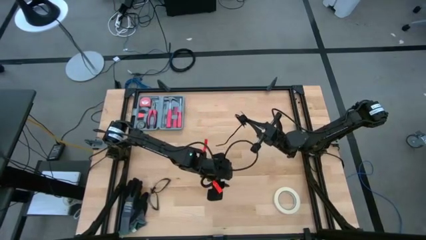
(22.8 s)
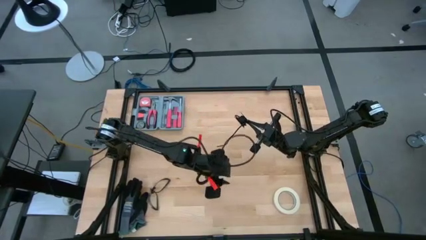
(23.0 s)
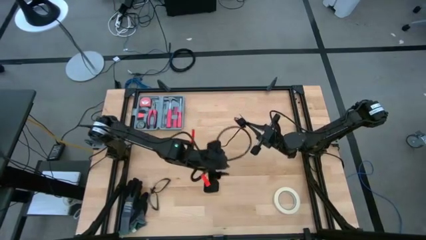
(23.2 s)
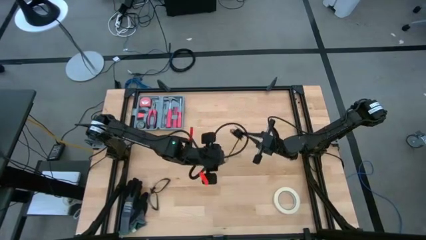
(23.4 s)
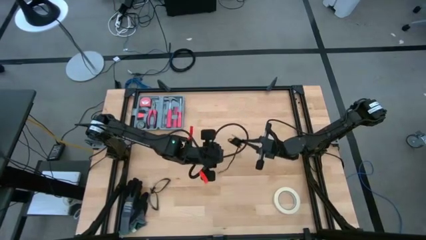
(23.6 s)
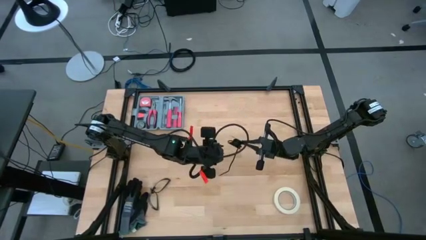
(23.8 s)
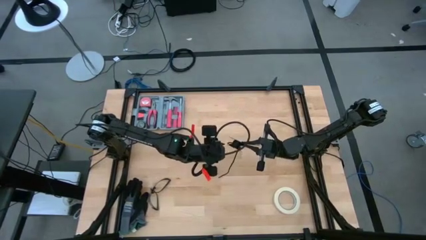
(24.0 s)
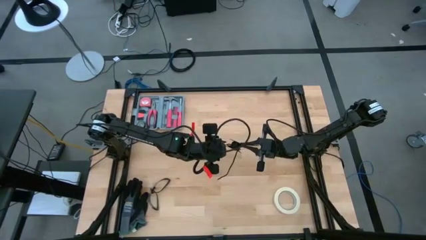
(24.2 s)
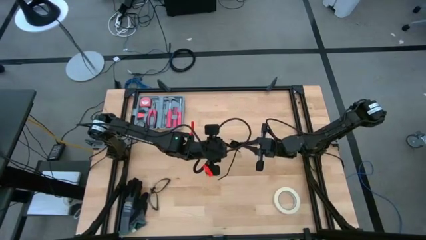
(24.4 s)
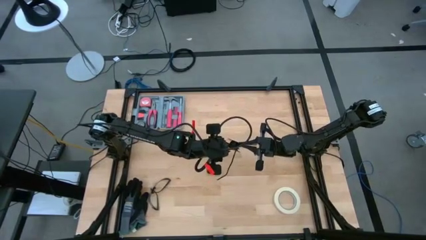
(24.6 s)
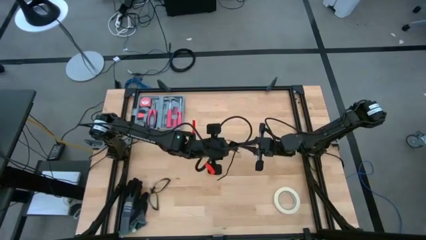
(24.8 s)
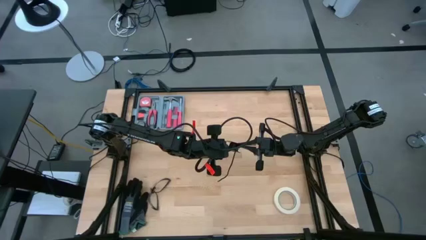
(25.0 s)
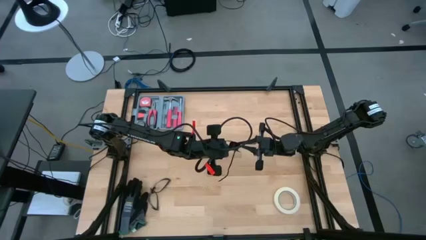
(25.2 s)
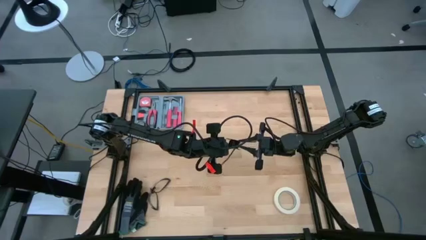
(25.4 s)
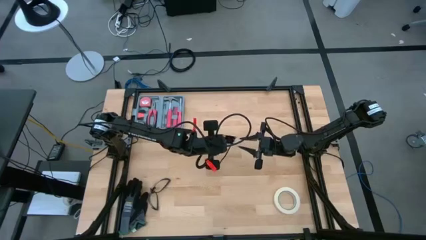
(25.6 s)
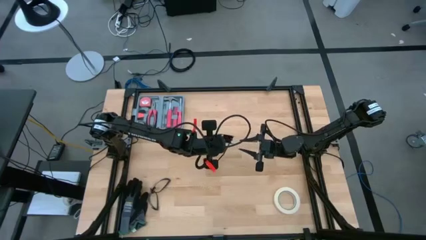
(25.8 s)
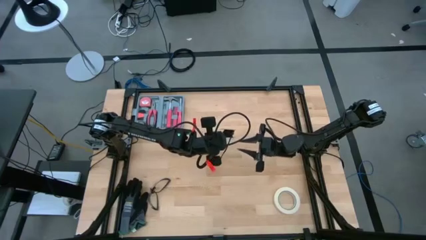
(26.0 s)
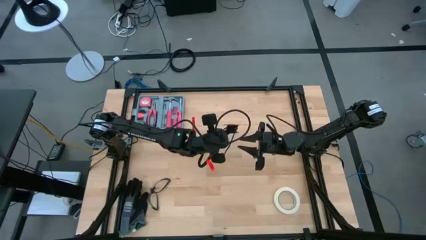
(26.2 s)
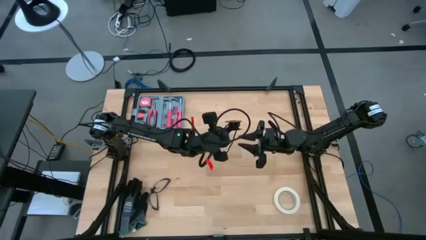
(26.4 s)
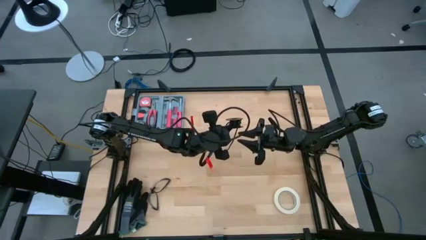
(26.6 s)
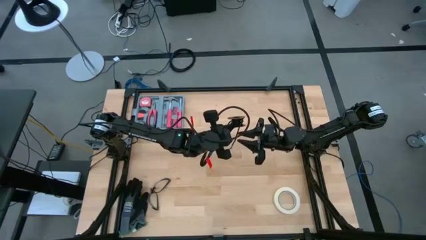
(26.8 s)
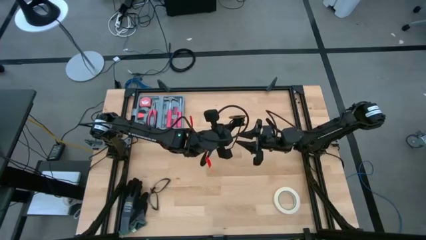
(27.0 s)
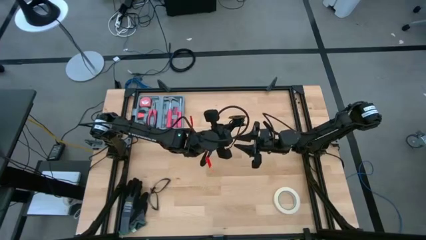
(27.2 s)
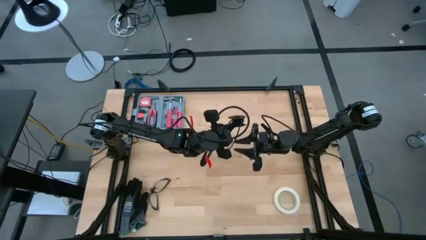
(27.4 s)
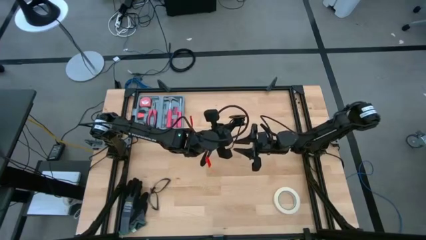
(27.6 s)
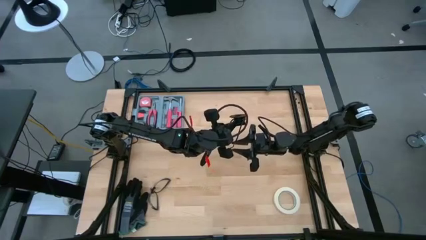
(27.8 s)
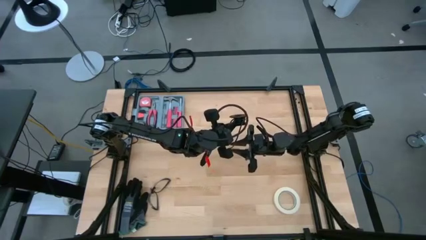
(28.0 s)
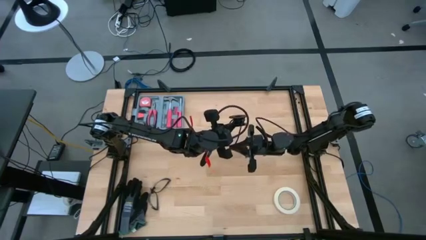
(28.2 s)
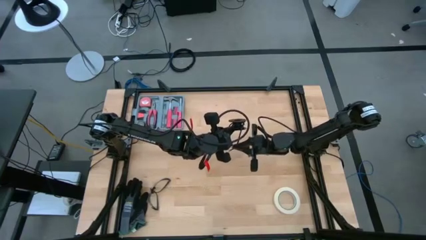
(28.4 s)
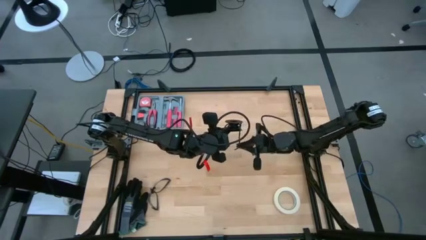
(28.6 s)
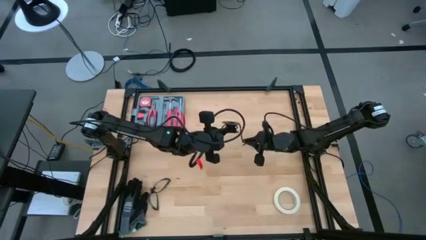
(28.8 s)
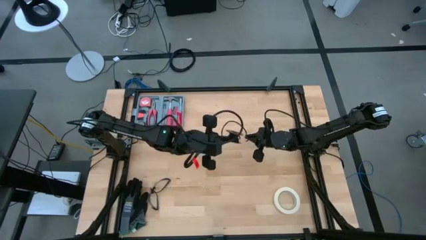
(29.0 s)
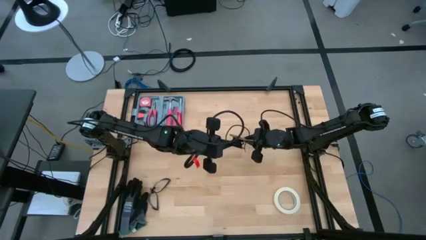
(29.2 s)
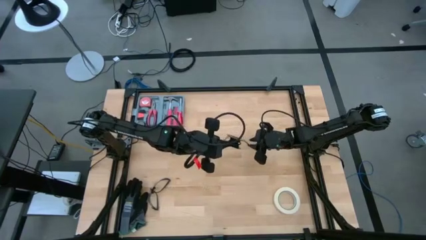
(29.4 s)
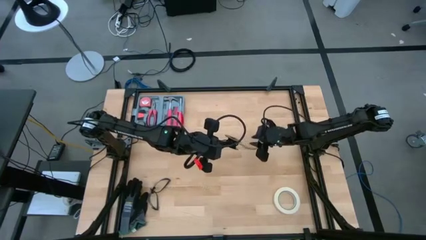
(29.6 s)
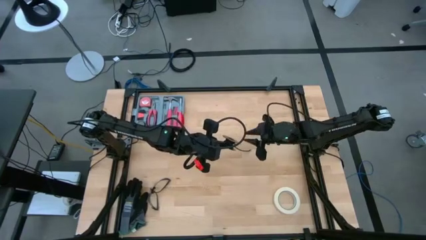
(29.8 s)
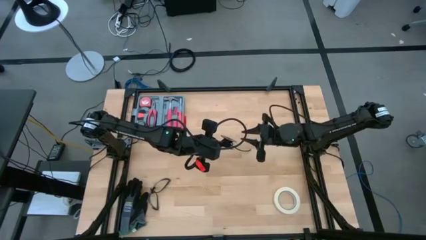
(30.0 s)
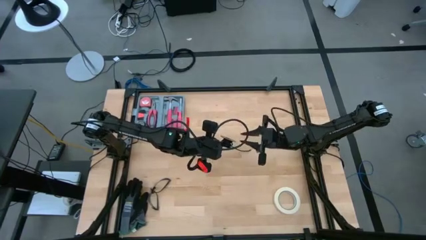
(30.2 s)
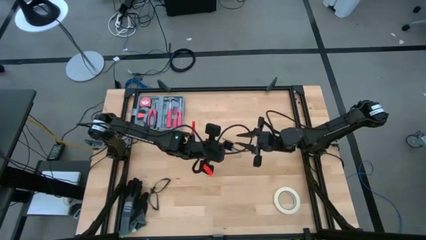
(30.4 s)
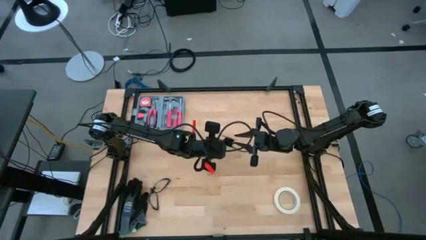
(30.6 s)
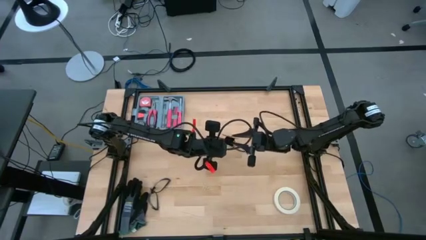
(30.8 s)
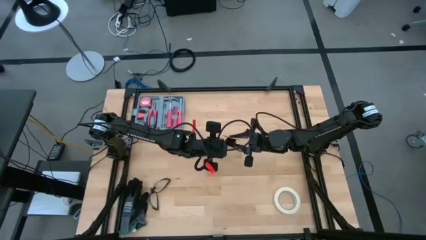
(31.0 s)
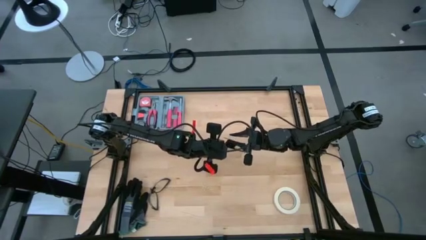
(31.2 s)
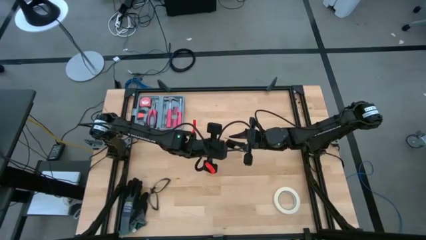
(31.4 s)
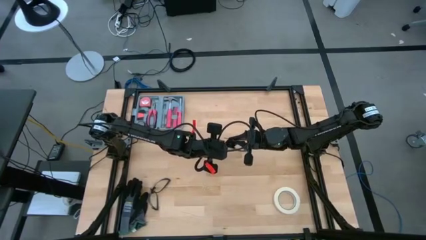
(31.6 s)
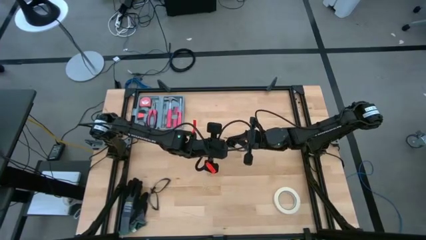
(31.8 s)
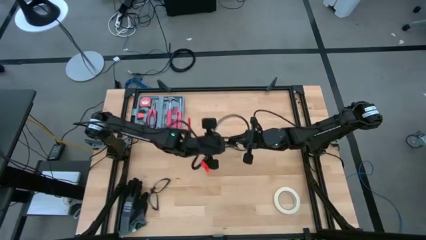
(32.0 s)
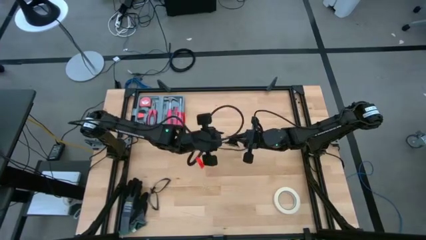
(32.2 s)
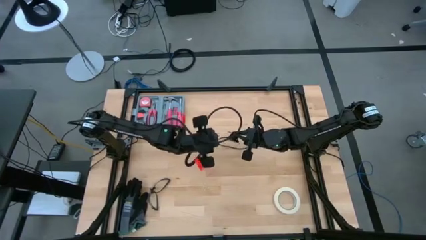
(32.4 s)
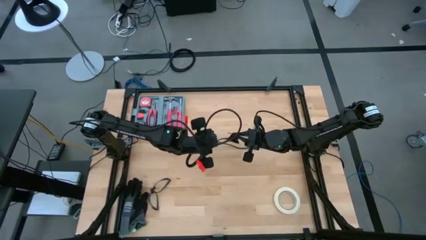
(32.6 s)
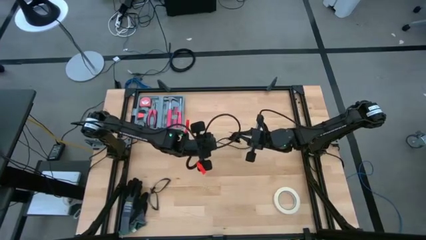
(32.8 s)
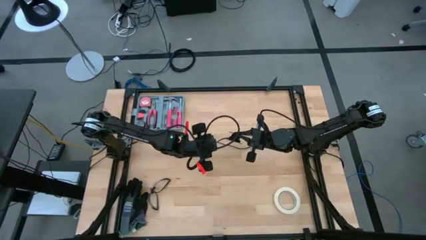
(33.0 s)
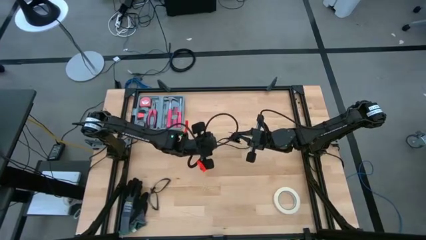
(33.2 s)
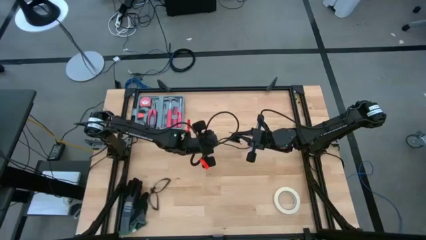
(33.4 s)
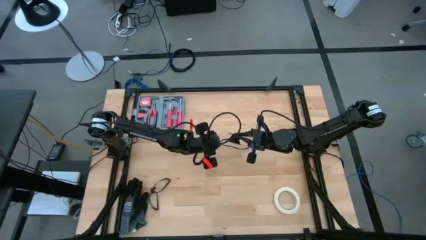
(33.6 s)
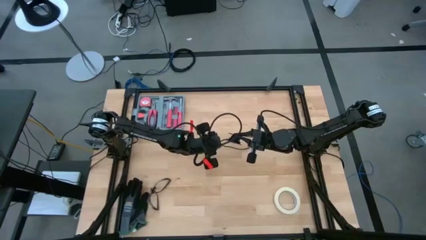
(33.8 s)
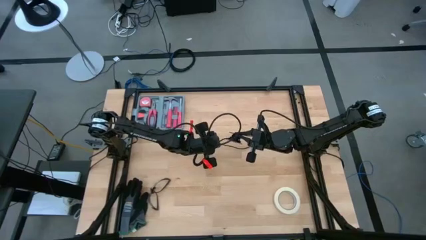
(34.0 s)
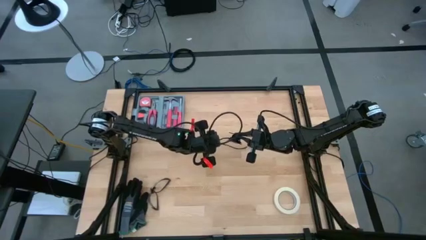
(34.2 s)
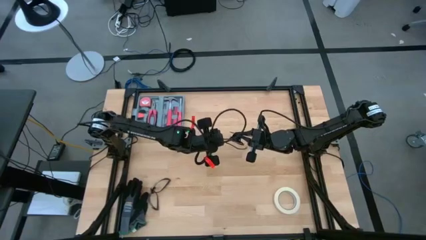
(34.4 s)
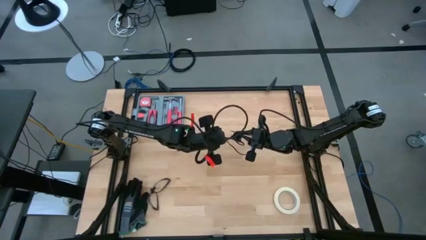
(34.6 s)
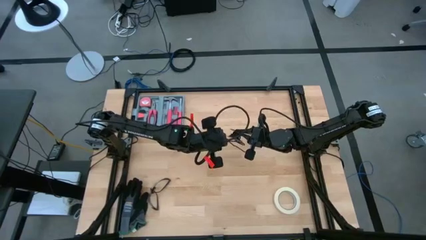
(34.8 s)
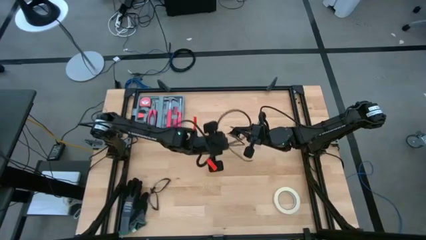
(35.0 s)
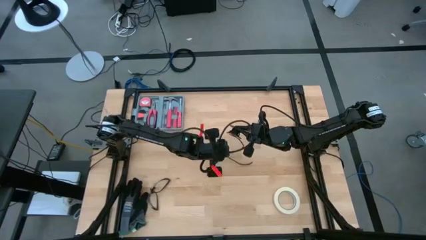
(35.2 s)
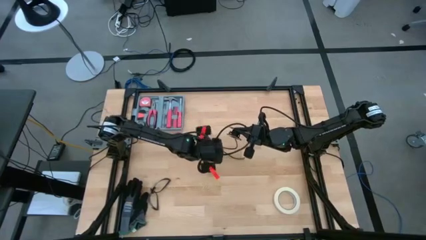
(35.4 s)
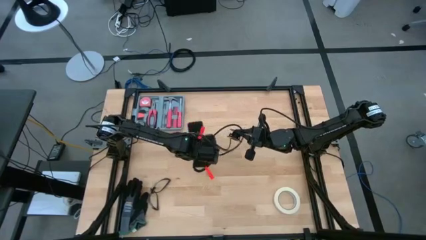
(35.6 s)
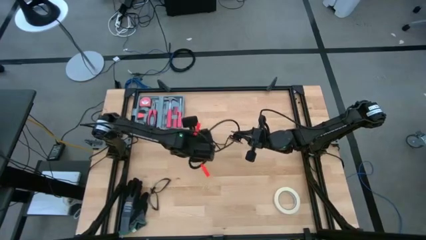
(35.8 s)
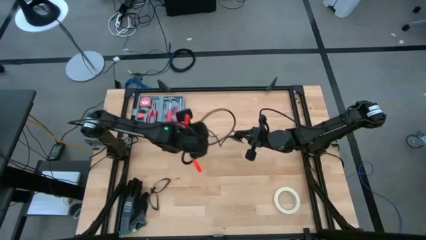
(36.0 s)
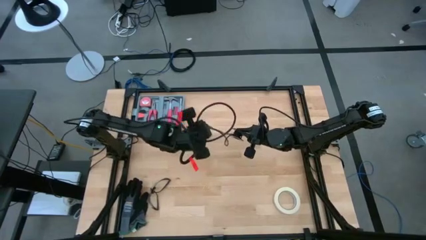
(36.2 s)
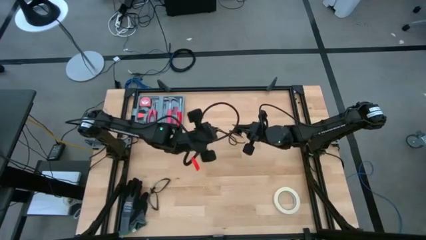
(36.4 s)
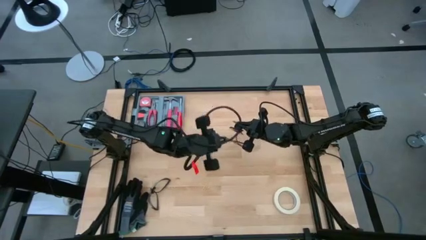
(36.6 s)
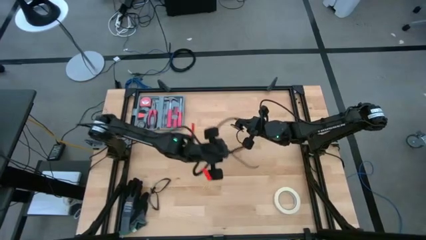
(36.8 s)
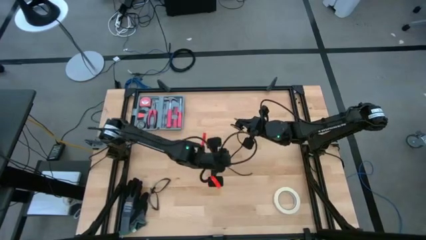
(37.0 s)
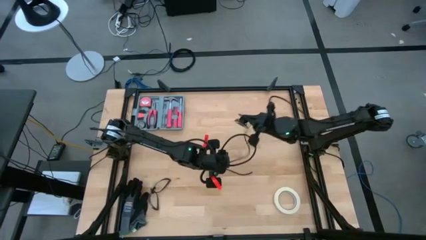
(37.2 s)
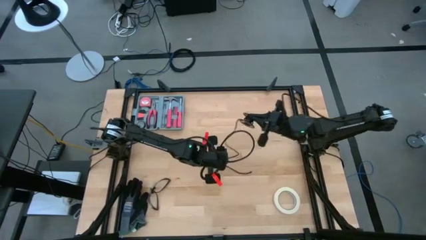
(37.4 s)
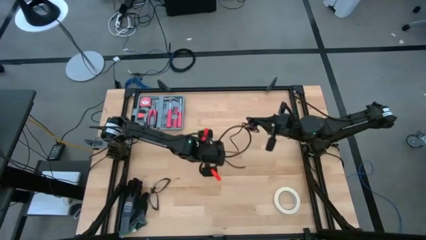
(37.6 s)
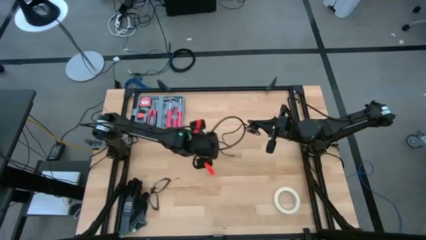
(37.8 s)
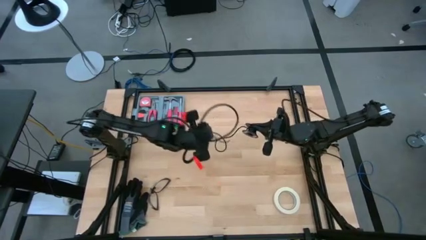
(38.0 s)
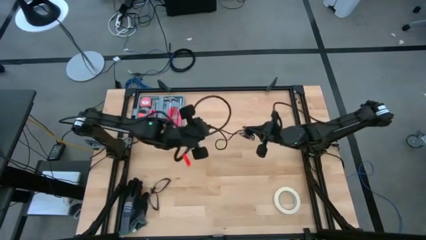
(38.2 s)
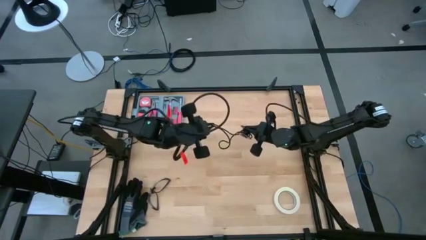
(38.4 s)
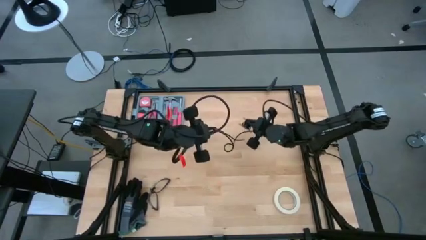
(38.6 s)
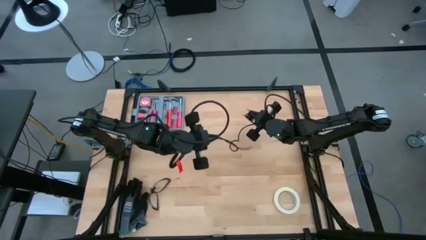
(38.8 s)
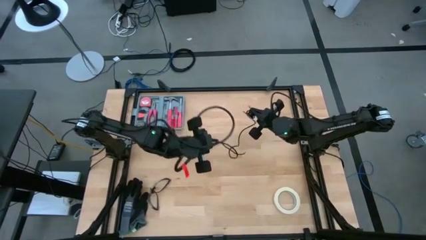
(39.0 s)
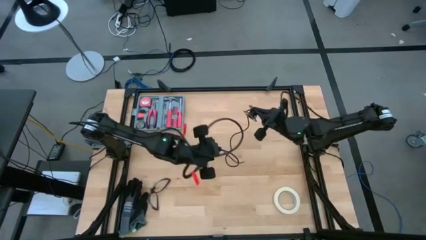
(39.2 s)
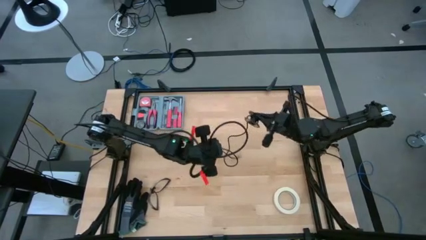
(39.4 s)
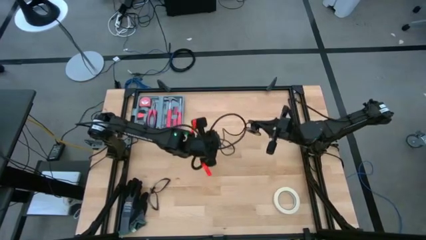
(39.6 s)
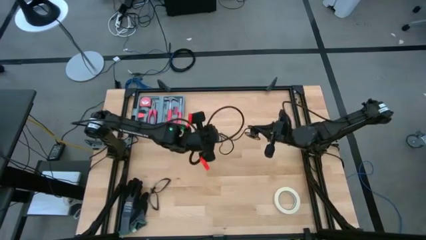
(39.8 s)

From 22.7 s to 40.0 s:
Task: Coil cords
Uncoil the black wire from the spool
